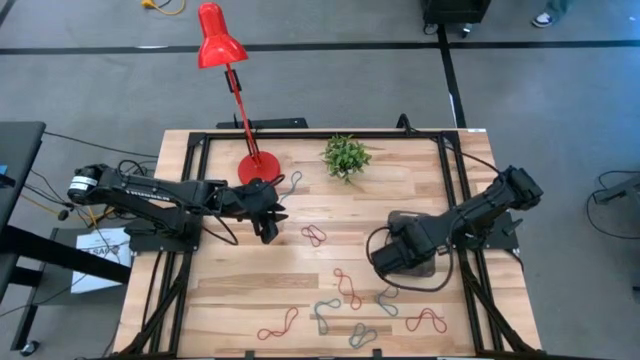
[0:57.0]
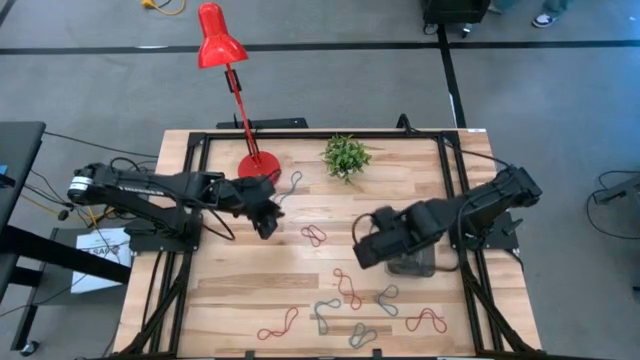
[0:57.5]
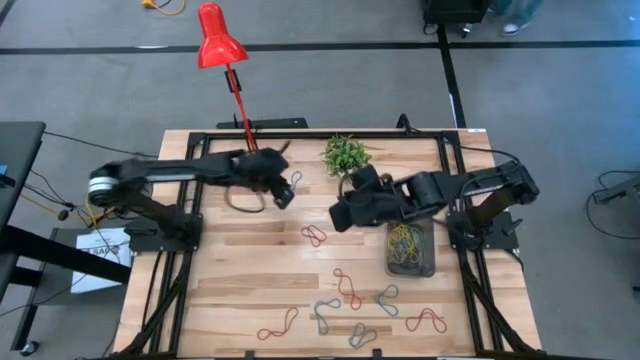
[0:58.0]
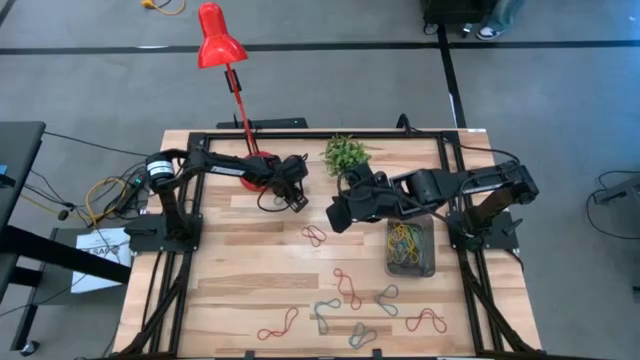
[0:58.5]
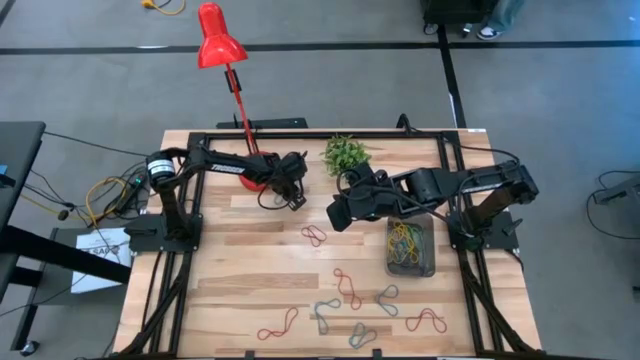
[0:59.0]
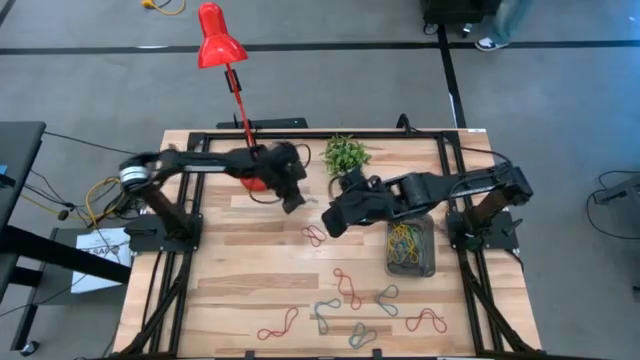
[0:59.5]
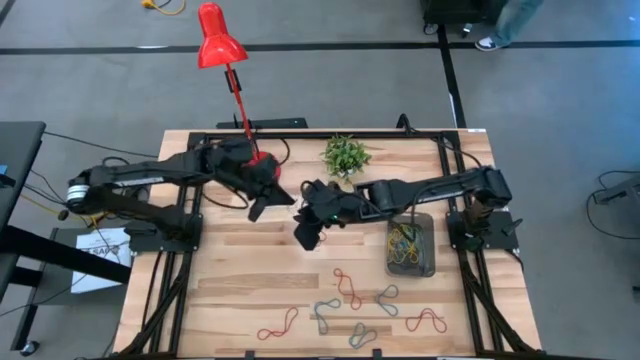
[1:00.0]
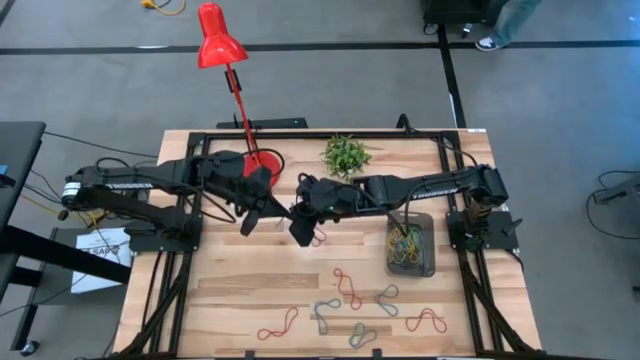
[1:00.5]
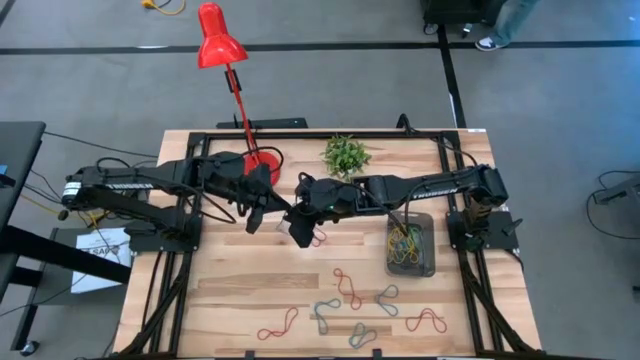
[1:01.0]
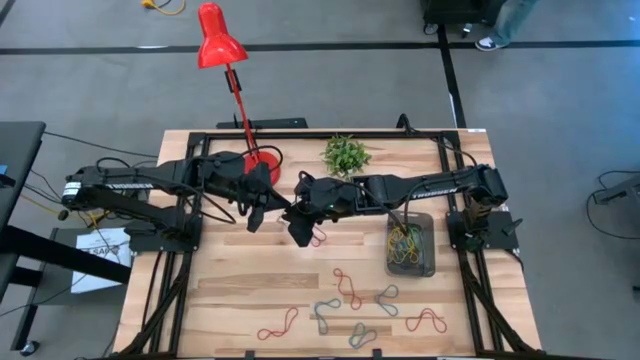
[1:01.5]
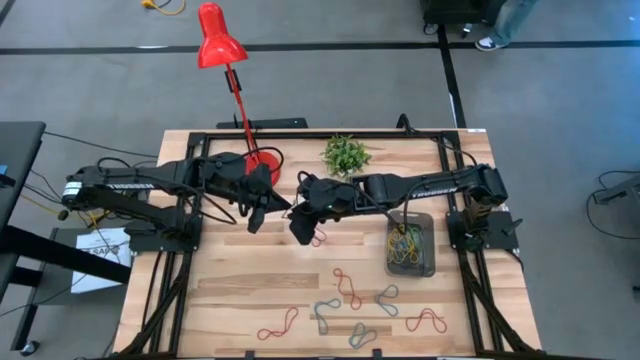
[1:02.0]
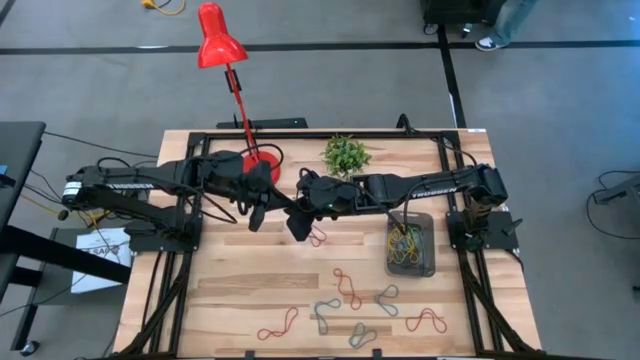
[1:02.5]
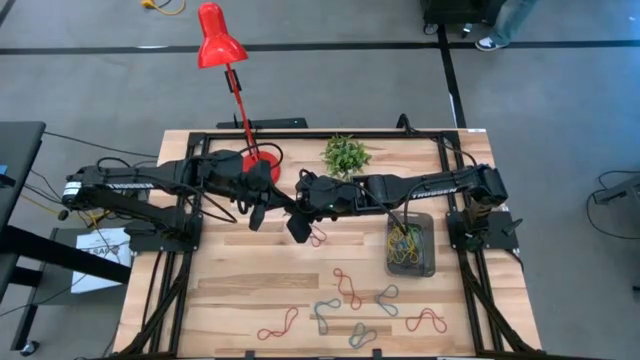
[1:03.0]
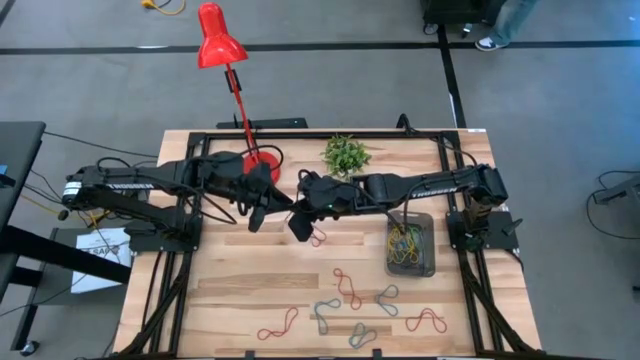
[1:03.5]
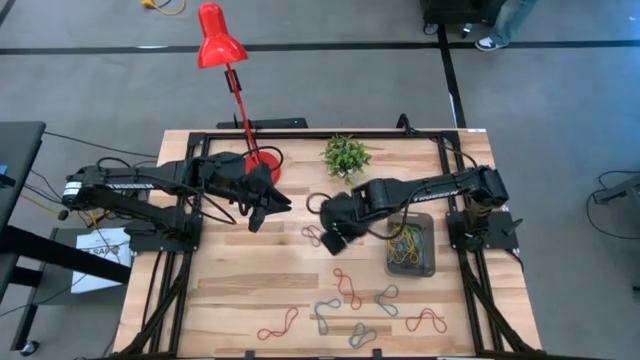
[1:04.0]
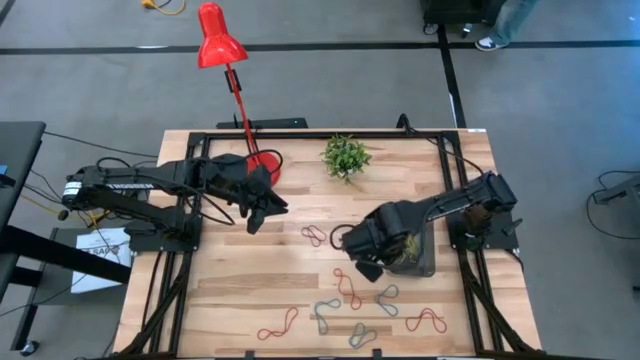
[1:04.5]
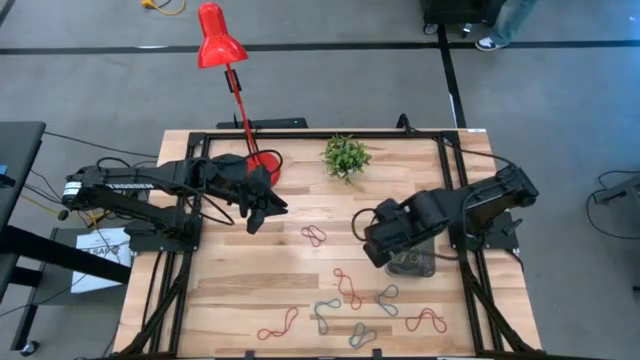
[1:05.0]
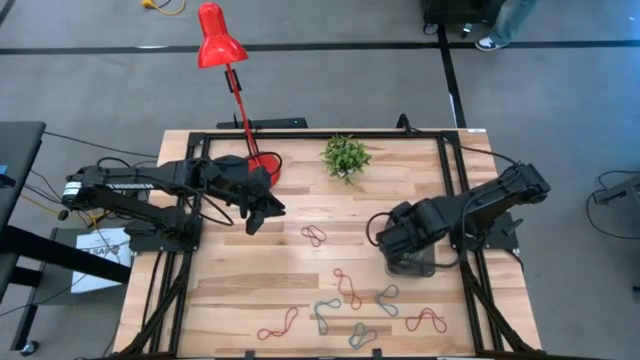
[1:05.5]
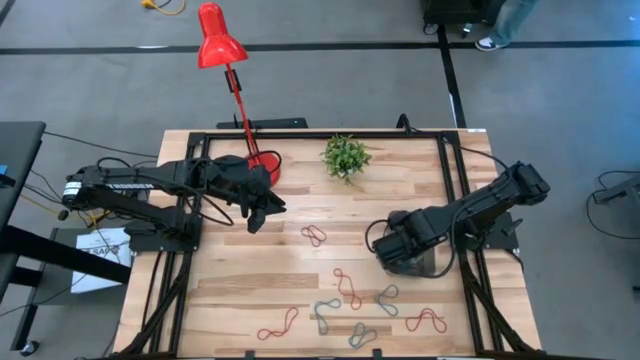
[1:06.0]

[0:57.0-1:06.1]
Task: Pick and place items into bin
Put the blue rubber band into the black bin

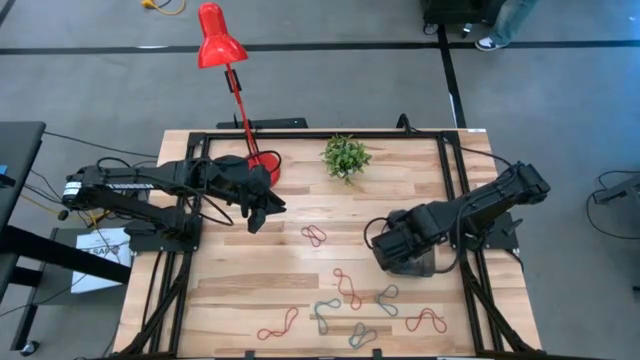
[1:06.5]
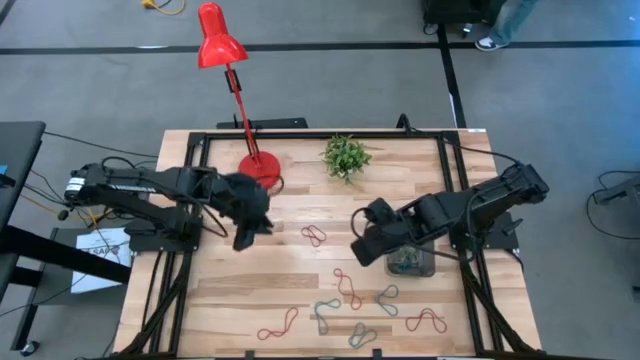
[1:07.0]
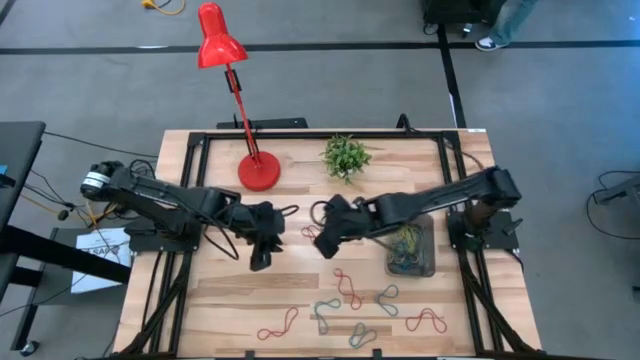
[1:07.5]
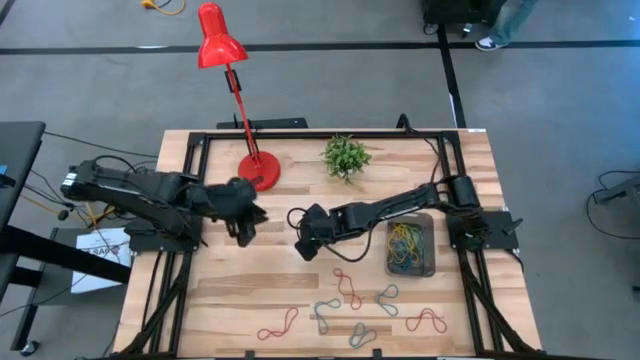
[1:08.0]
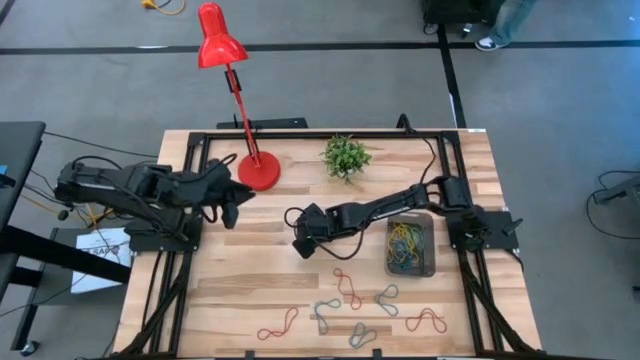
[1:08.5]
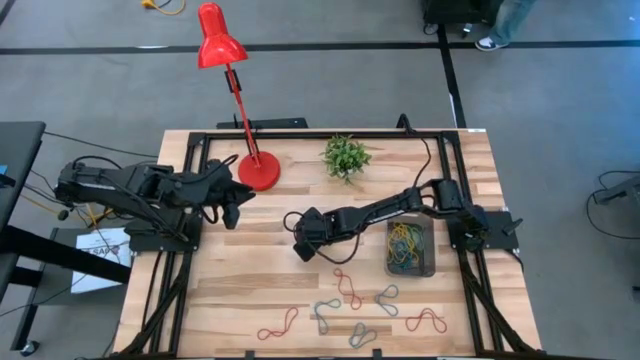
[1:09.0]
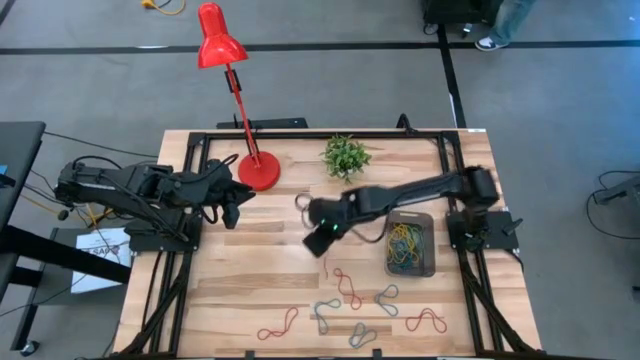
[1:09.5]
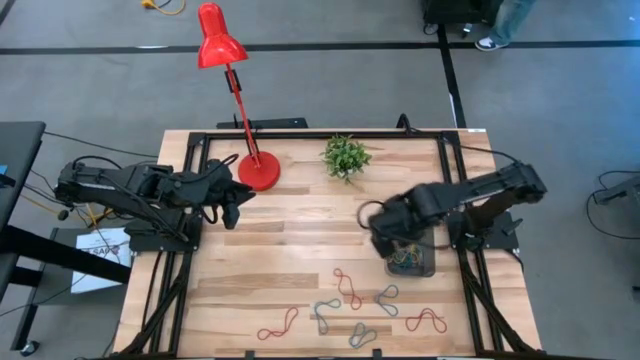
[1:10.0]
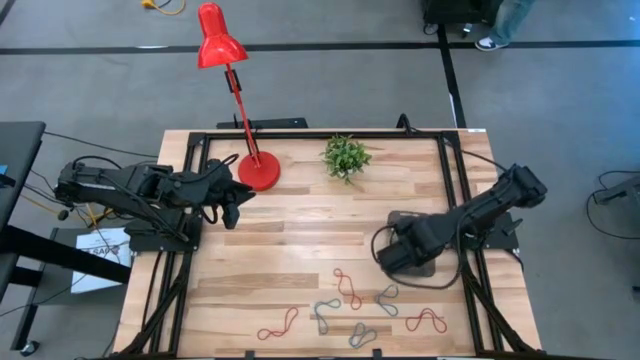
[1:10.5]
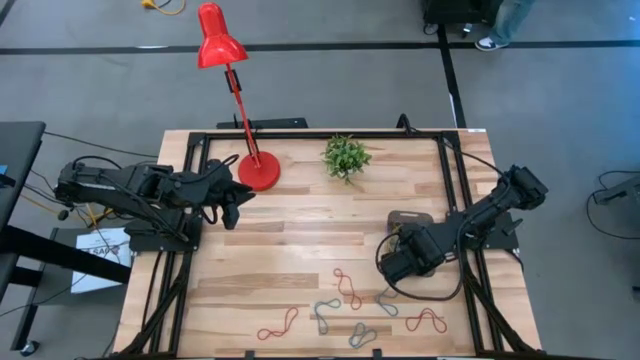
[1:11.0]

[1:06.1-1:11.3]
Put the red rubber band into the black bin

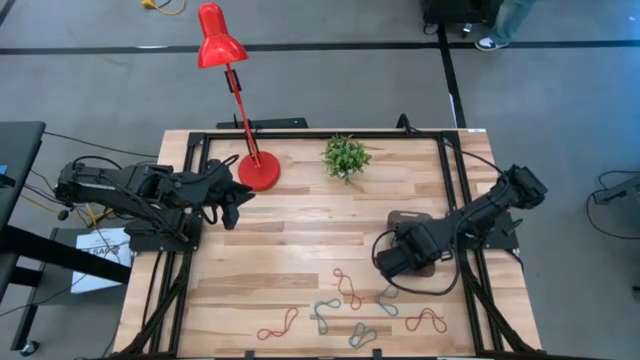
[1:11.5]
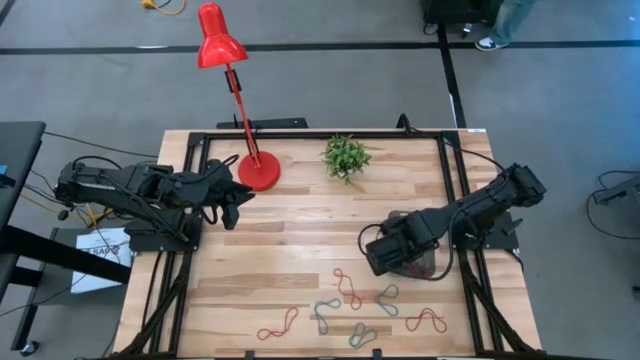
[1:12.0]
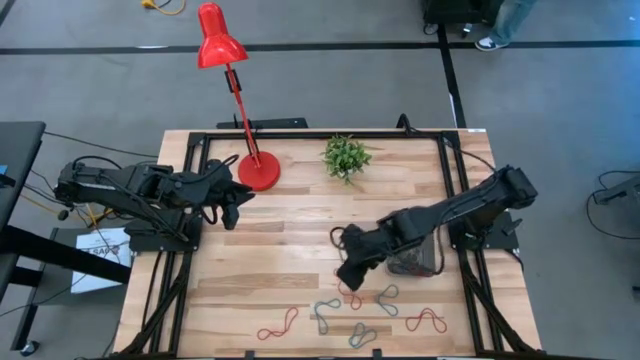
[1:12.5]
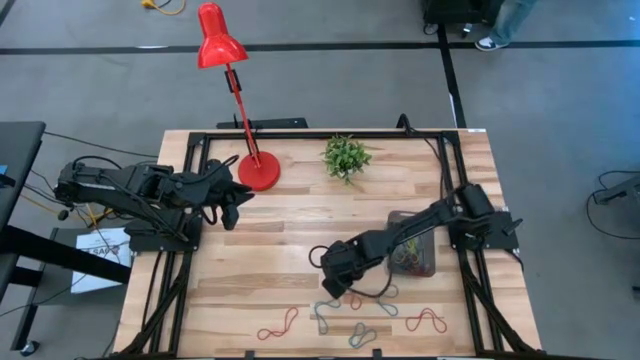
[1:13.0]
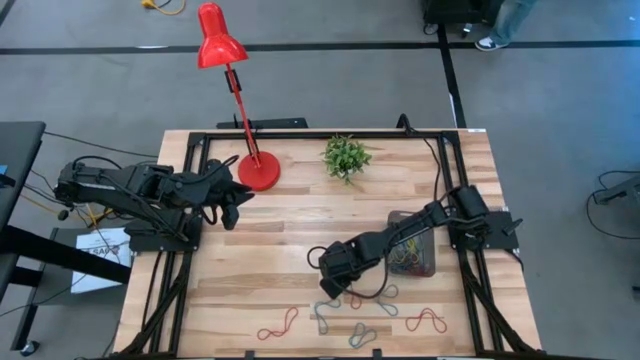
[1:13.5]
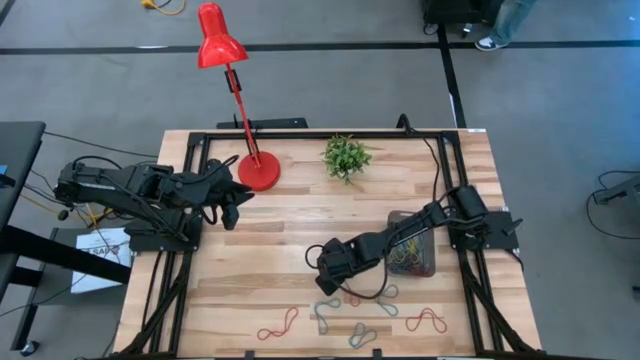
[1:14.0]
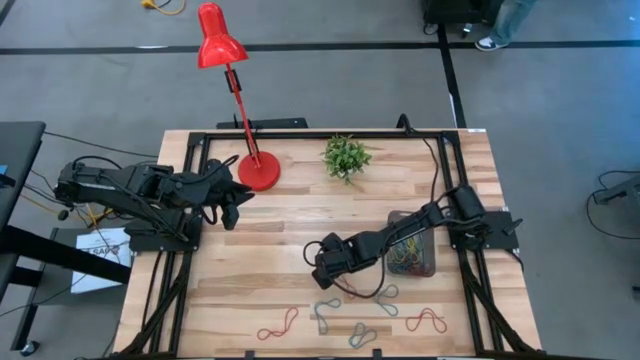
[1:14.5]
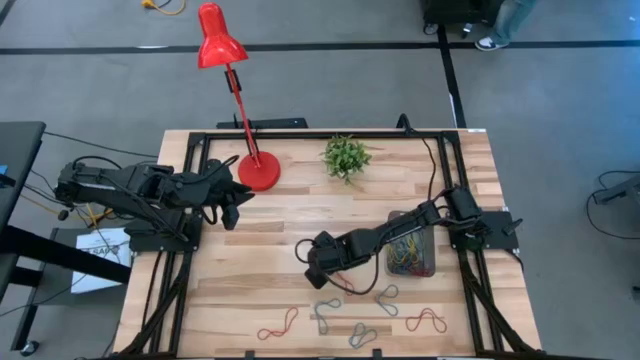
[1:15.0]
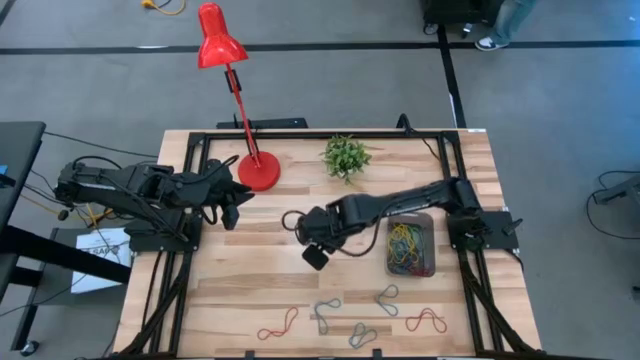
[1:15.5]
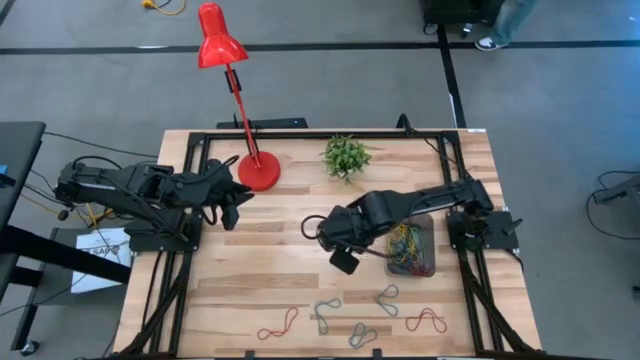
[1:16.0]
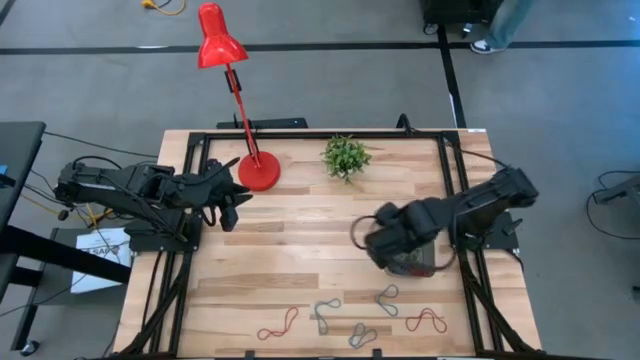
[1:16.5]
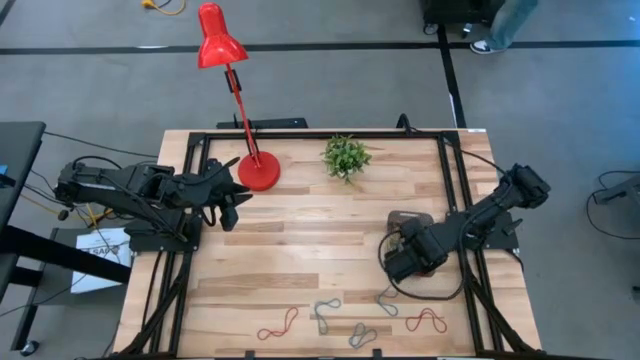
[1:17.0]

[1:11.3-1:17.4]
Put the red rubber band into the black bin

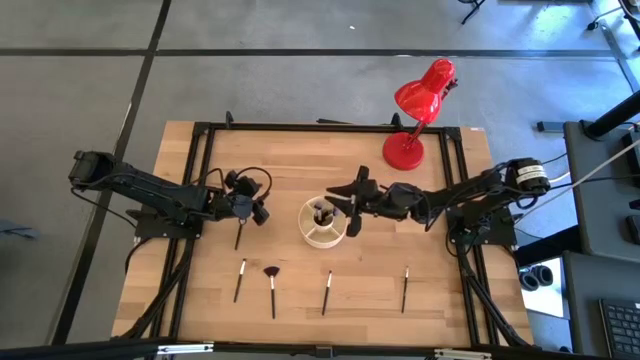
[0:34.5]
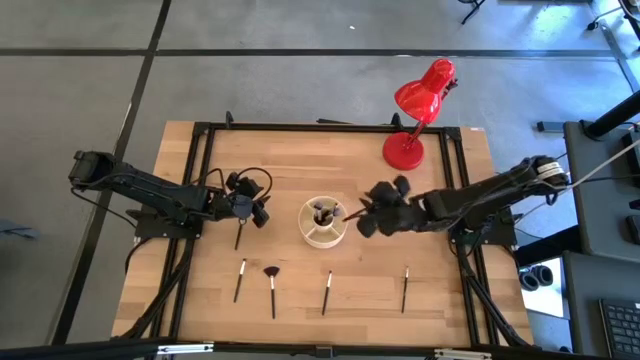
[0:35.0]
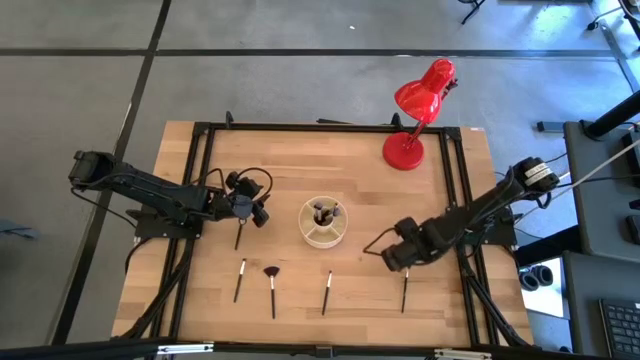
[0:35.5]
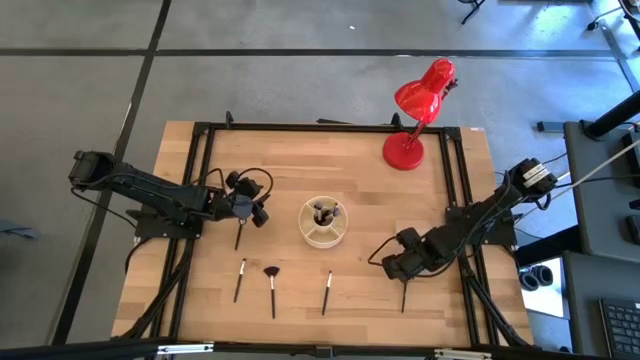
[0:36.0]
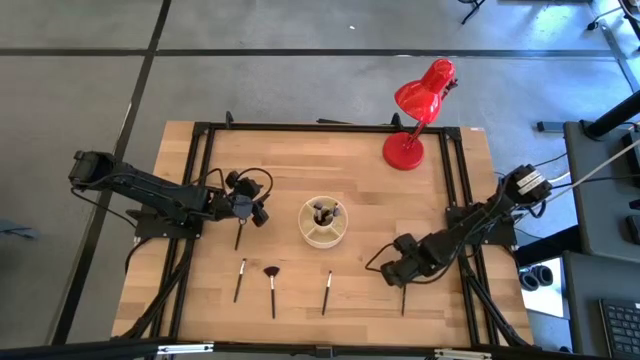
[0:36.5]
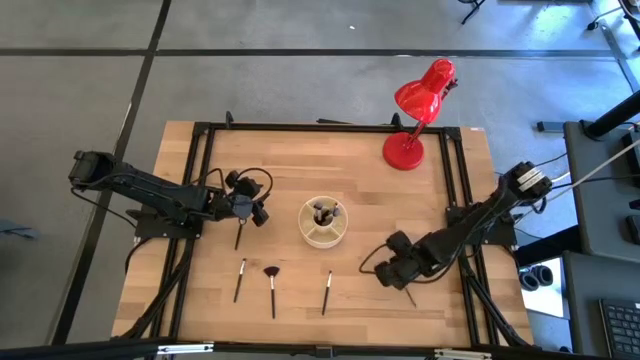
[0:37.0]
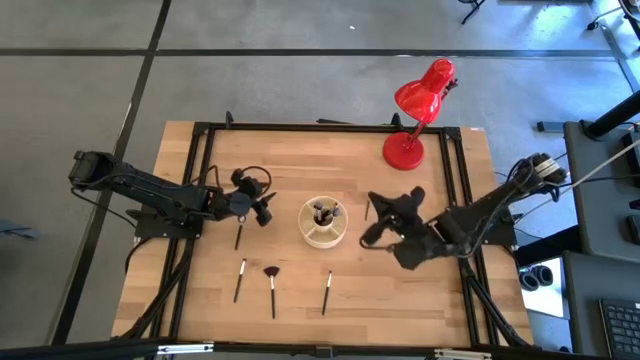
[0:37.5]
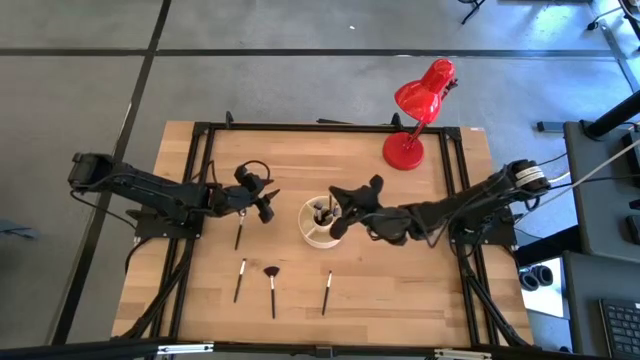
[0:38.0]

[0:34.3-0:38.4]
Task: Put items in baskets/containers
Put the black eyeshadow brush into the white brush holder
